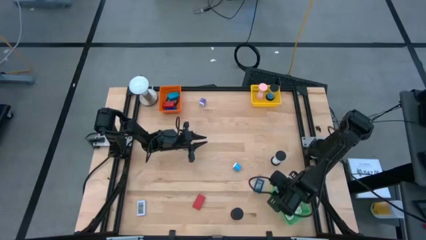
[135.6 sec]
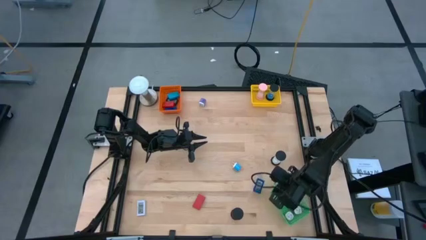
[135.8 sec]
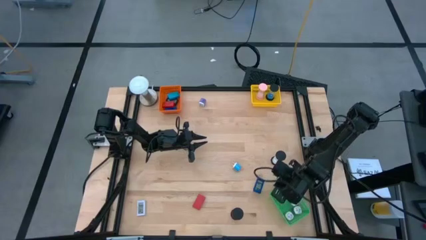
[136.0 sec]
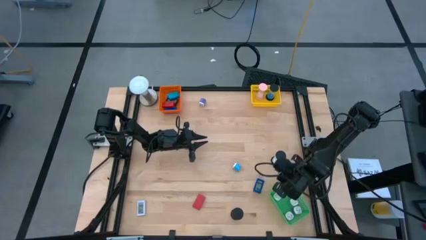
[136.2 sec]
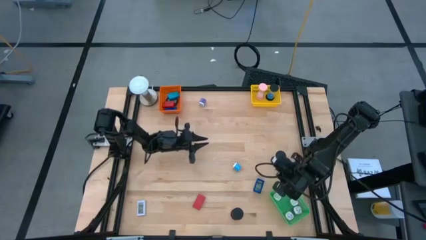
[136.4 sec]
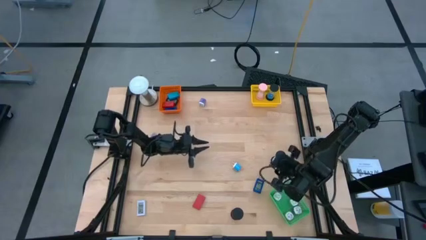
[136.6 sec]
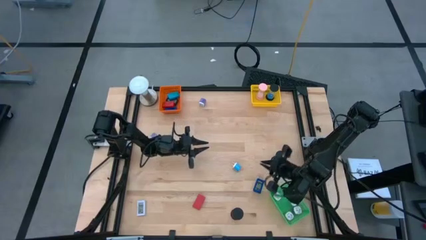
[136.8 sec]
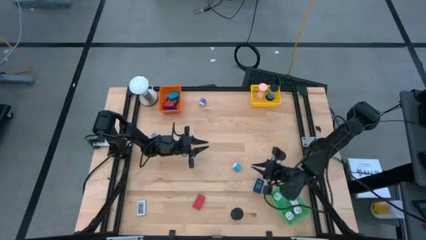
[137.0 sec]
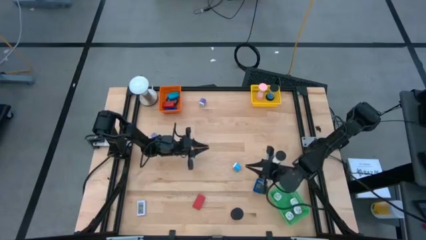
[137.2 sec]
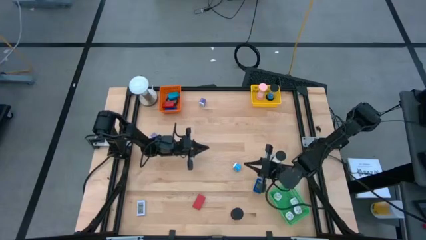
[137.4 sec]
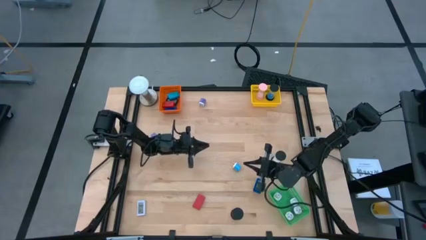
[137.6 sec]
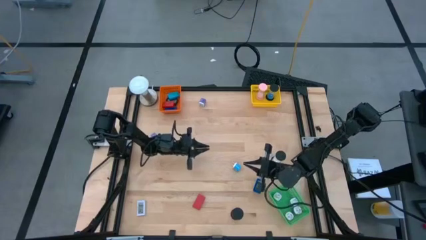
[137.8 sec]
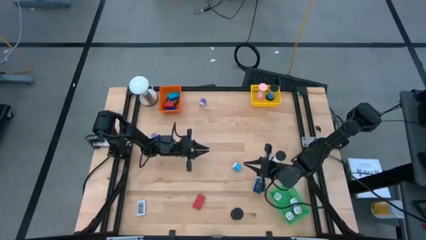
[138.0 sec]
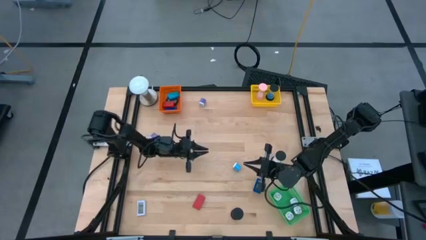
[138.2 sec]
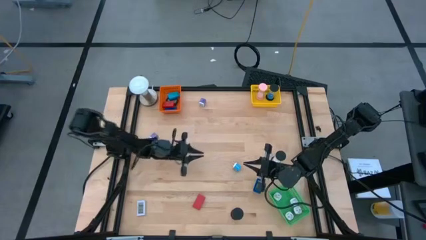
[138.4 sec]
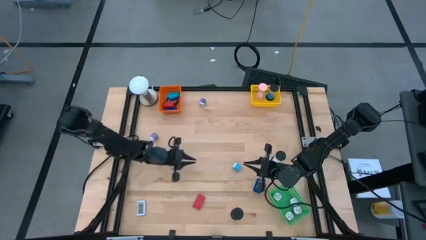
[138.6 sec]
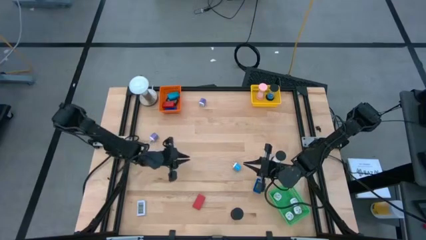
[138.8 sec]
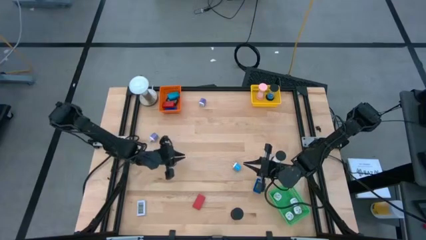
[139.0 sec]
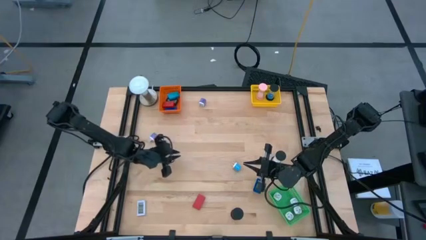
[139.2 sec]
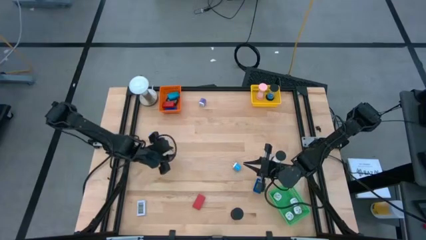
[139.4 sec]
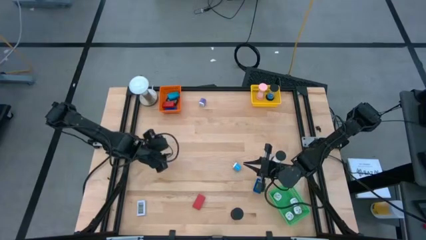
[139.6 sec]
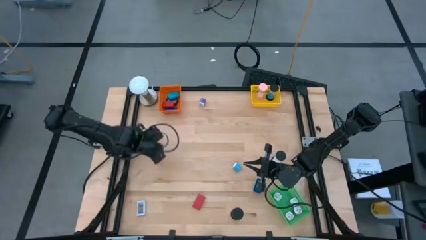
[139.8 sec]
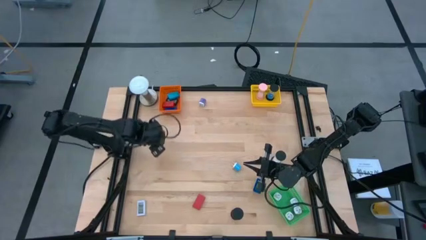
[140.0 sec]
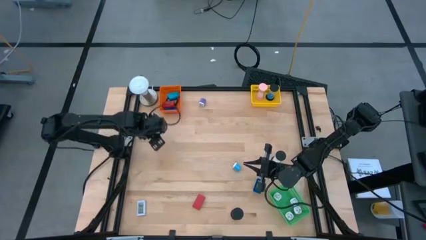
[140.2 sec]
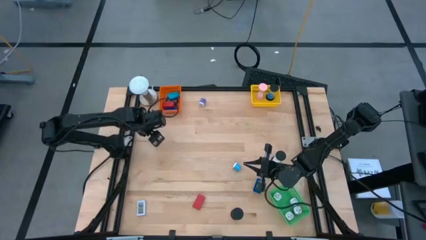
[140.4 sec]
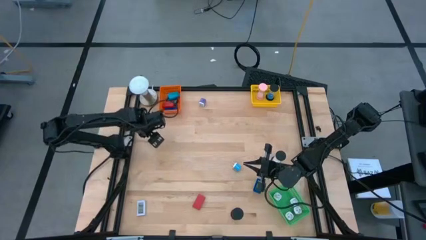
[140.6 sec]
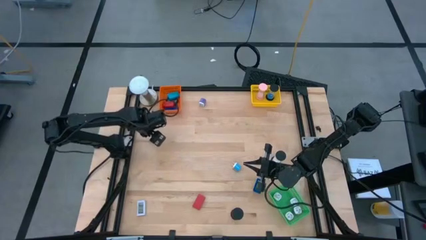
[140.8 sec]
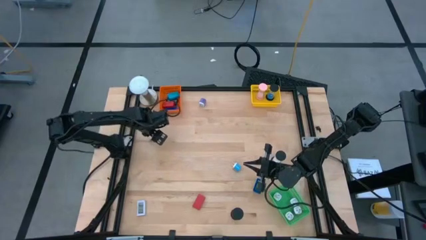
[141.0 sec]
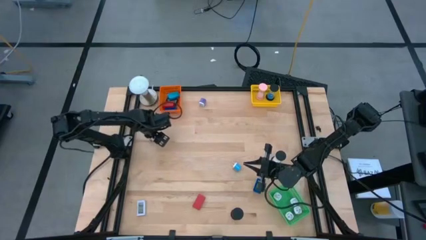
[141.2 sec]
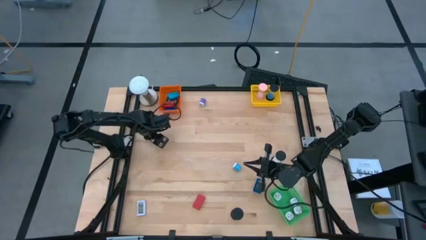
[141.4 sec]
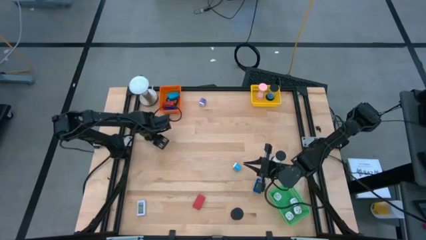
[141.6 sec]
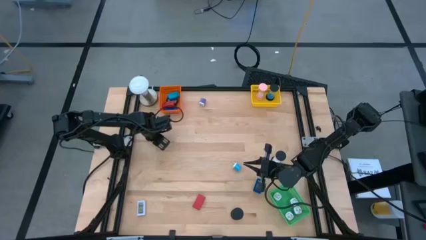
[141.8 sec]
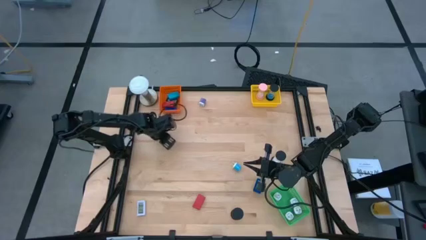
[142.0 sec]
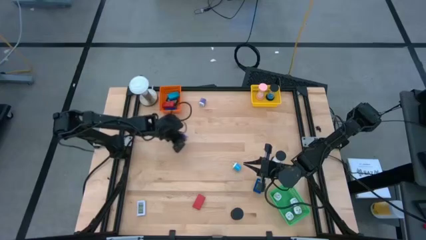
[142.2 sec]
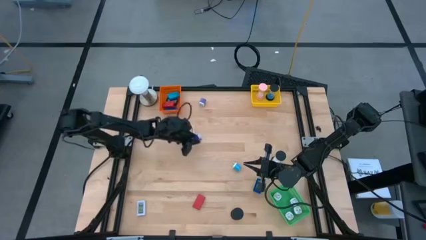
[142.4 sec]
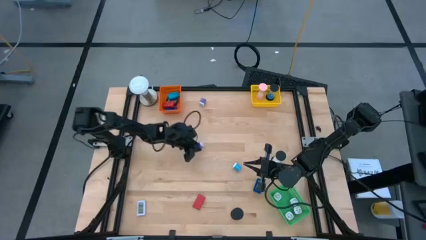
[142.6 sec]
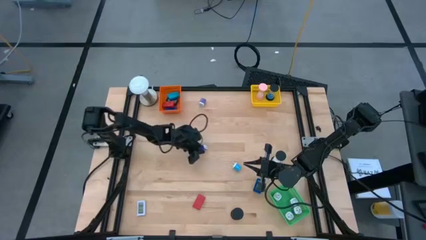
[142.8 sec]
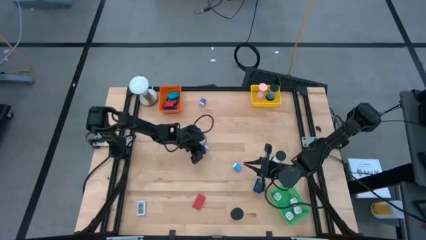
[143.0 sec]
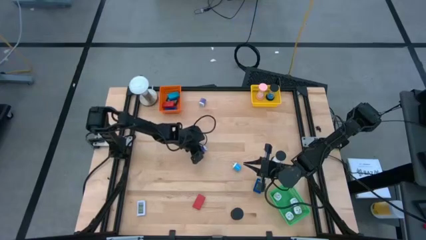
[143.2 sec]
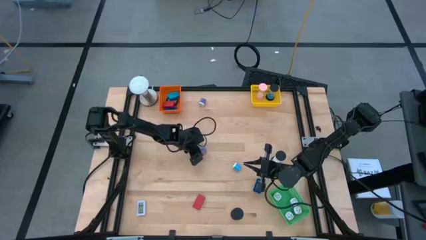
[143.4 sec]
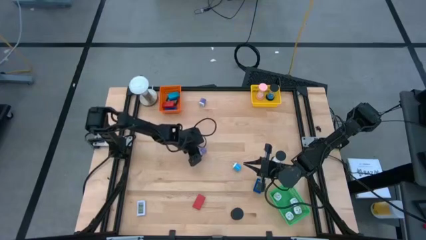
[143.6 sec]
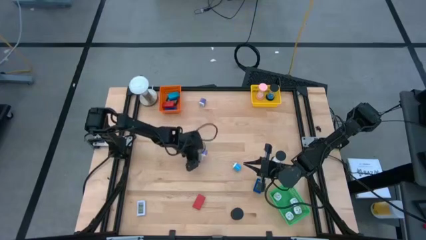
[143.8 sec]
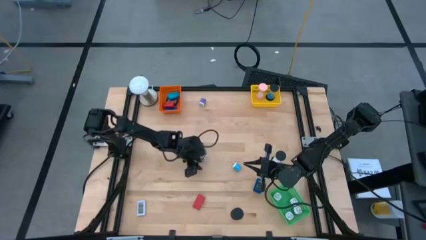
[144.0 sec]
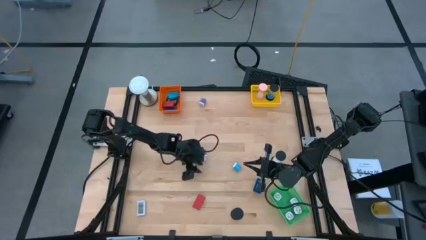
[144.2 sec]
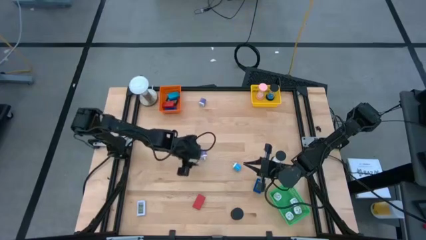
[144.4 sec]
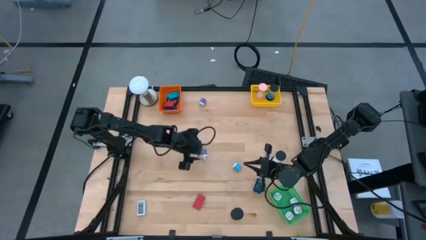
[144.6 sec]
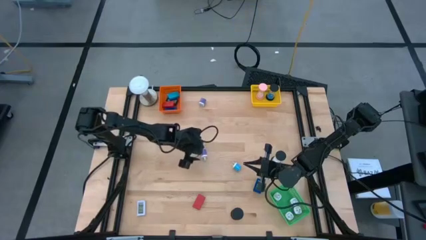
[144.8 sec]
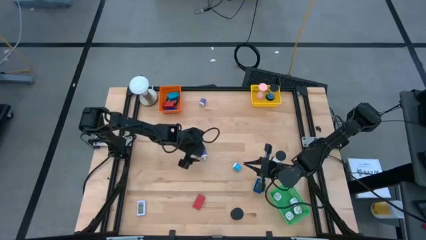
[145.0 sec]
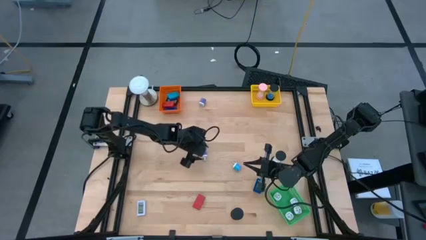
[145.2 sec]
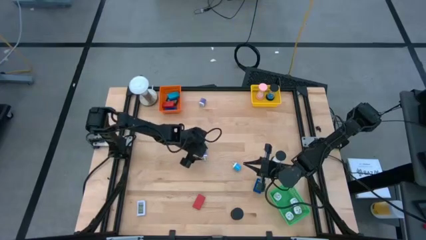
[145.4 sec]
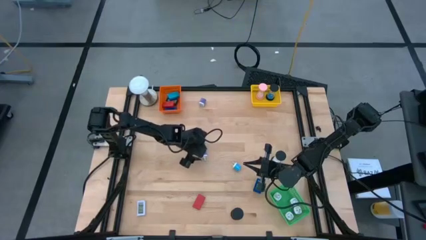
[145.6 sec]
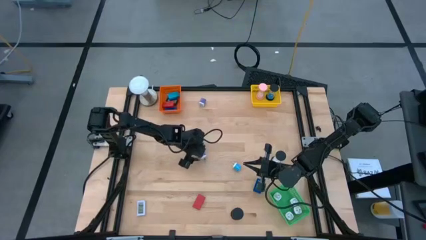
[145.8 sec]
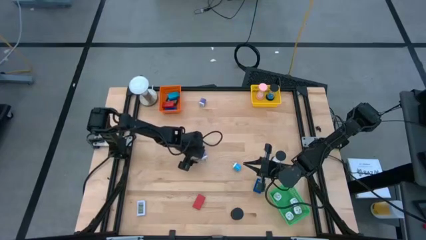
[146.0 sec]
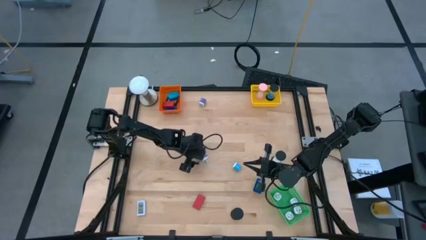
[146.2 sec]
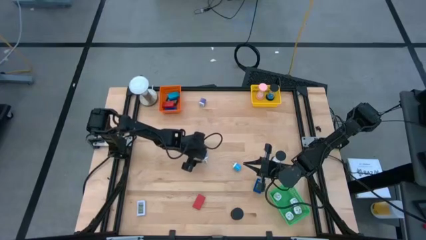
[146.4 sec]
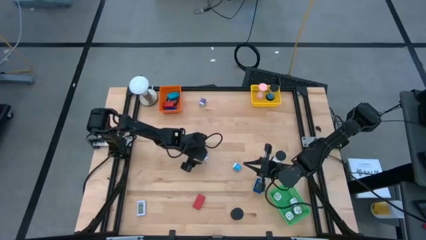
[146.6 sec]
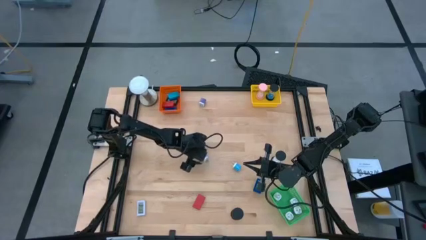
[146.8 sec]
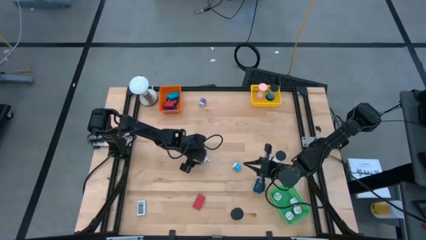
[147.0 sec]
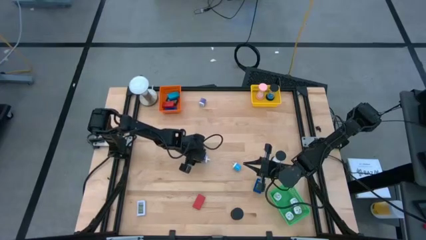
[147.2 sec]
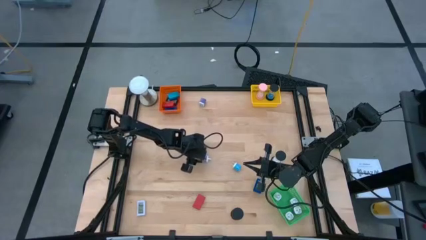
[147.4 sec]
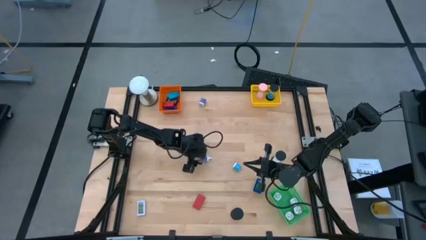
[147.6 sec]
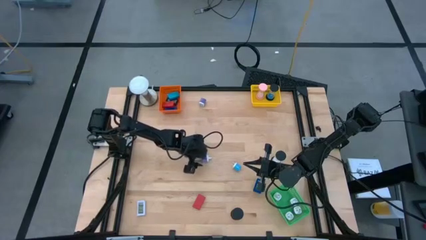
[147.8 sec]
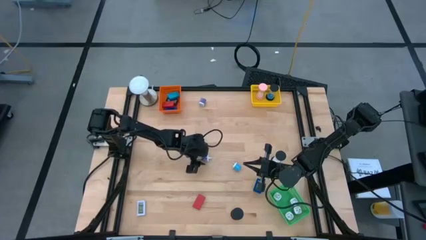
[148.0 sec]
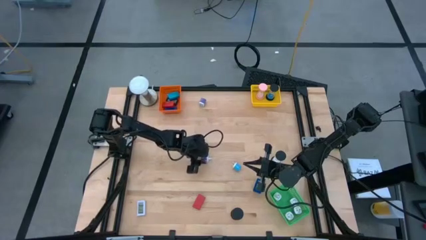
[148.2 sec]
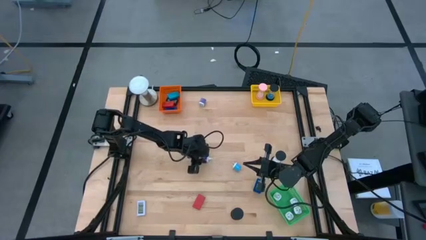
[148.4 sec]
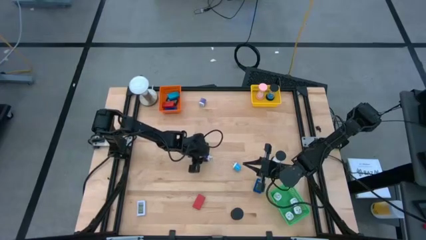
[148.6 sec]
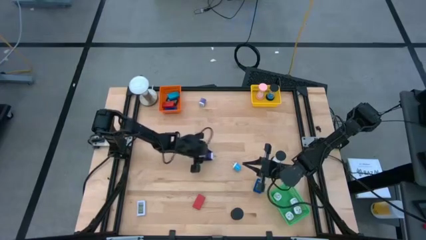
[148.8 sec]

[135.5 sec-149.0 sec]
Task: Pick & Place Office items
Put the bottom violet charger adapter into the green bin

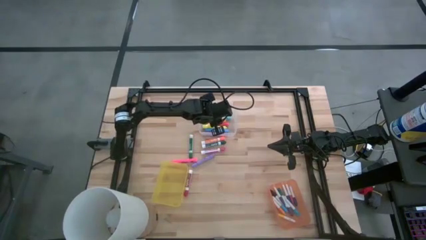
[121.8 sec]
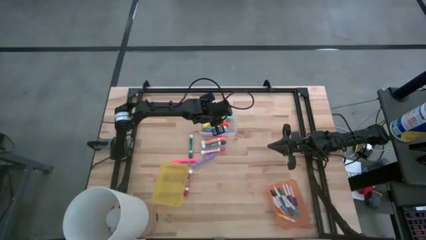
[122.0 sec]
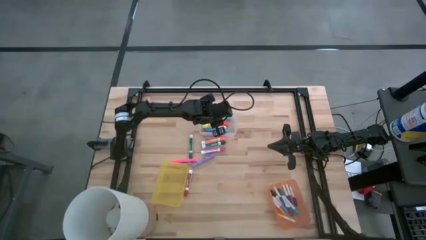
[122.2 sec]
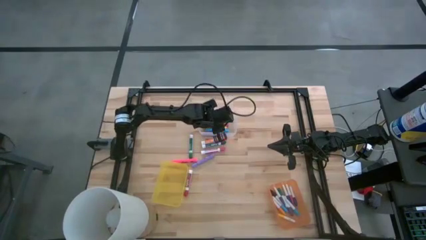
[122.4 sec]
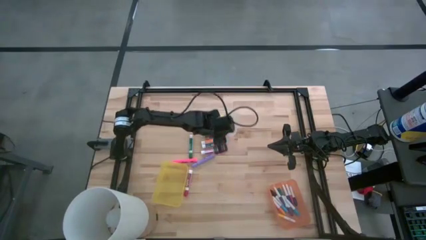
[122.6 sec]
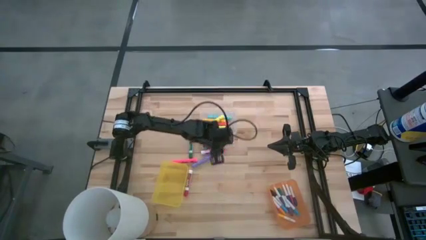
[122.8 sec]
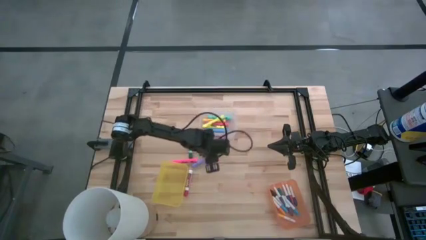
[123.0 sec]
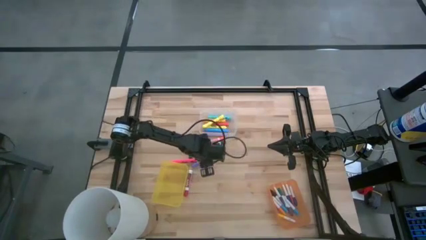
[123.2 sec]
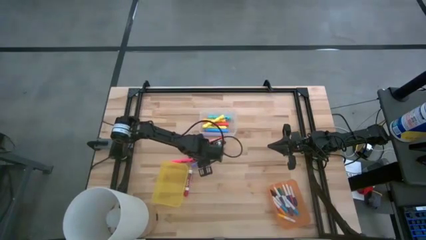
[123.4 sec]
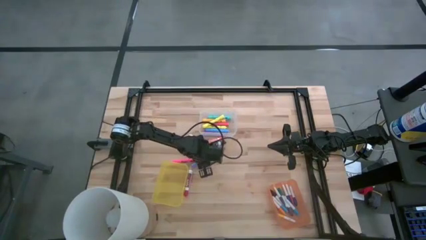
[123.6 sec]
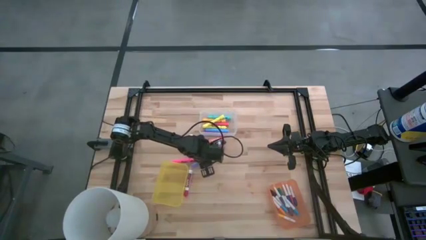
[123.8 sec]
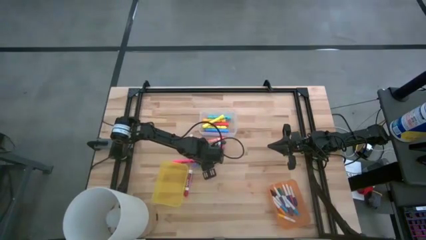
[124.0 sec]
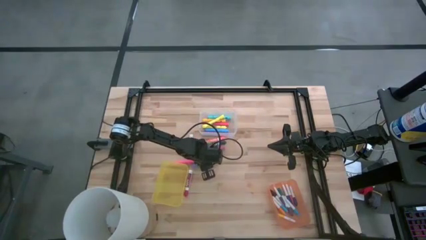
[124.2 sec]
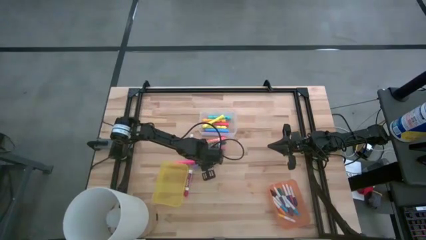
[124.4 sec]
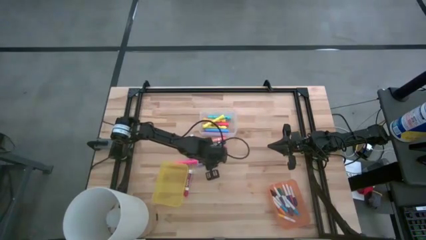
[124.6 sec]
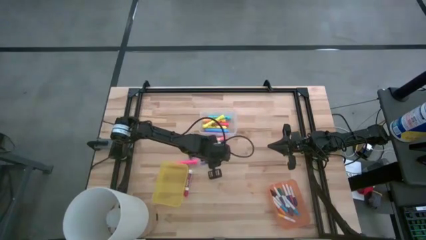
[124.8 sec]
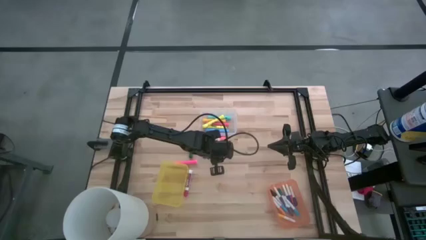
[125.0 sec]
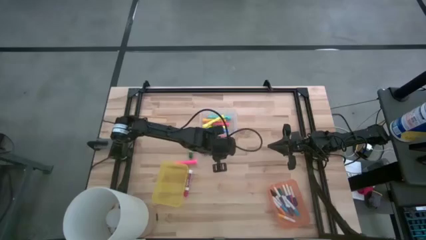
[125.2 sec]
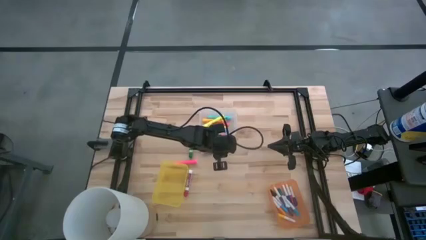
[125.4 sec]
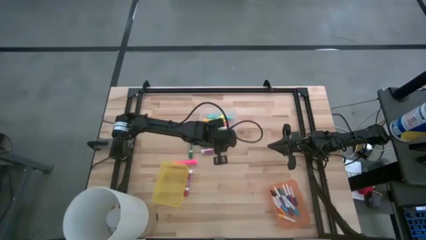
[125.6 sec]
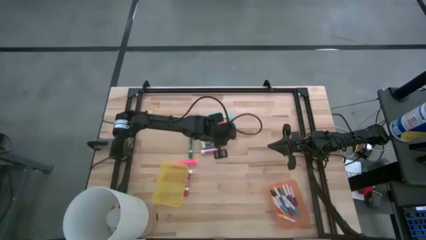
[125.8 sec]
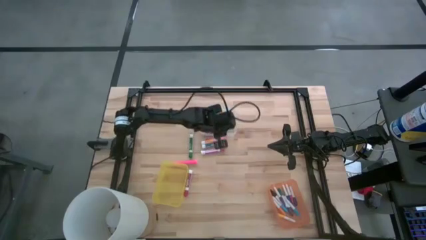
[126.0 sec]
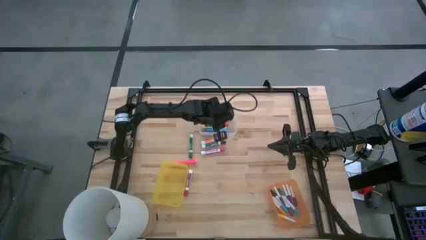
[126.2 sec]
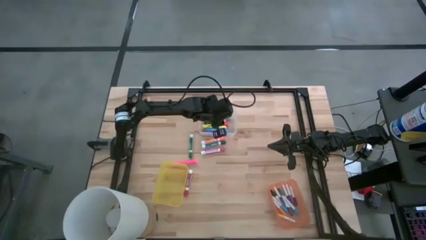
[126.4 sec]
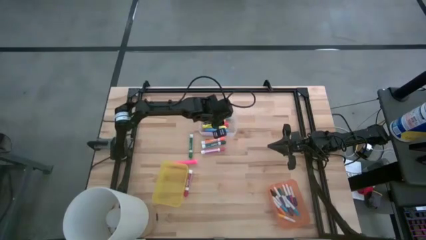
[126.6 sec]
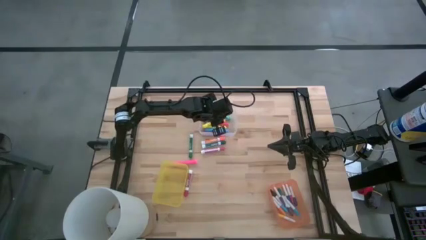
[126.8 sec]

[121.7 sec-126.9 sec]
Task: Pick & Place Markers
Put the large purple highlighter pen into the transparent bin
